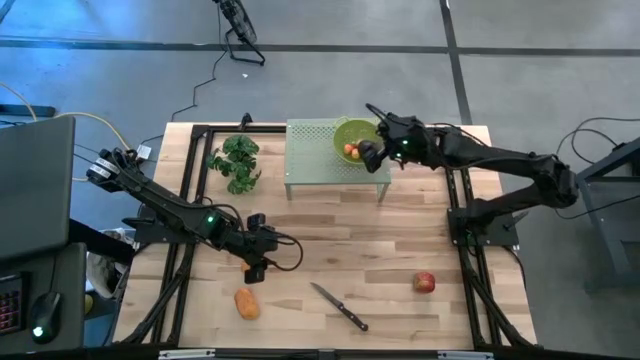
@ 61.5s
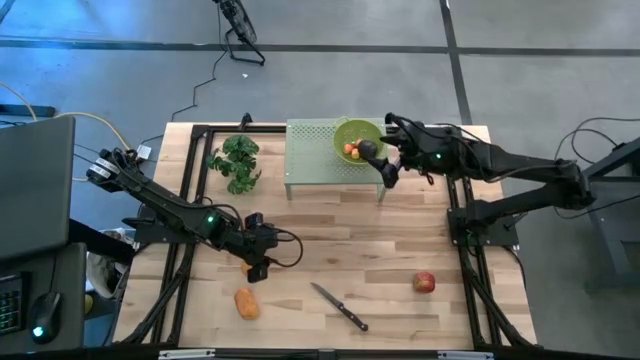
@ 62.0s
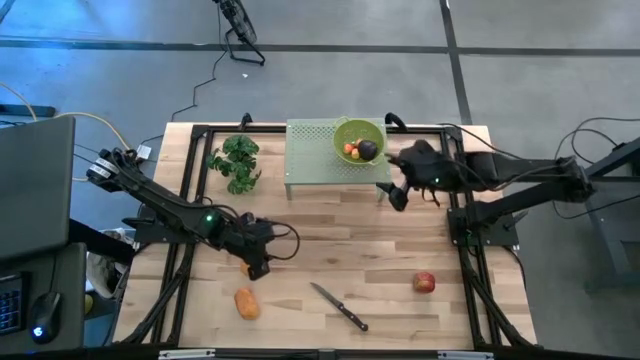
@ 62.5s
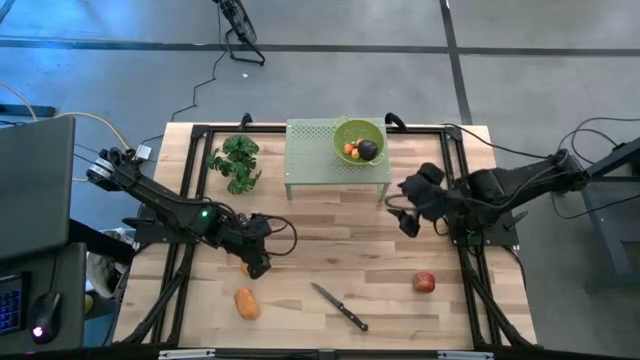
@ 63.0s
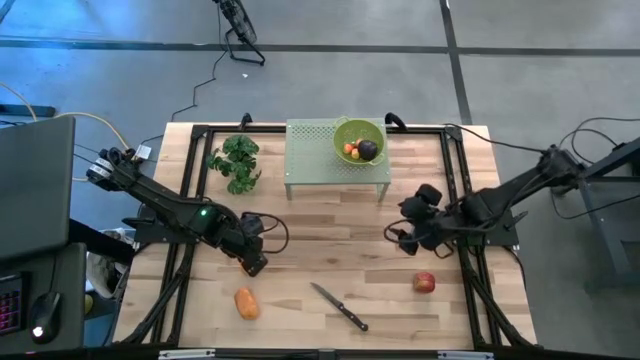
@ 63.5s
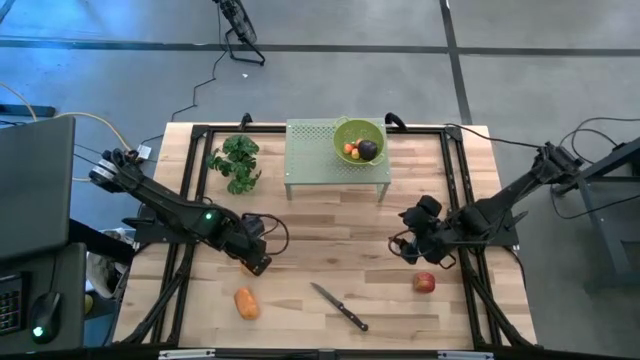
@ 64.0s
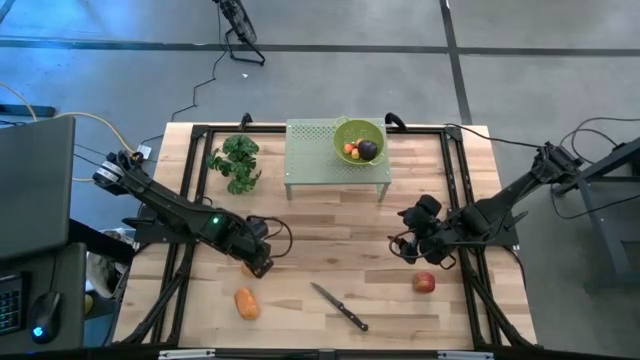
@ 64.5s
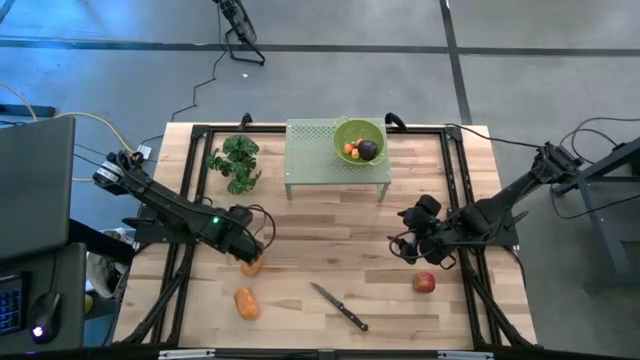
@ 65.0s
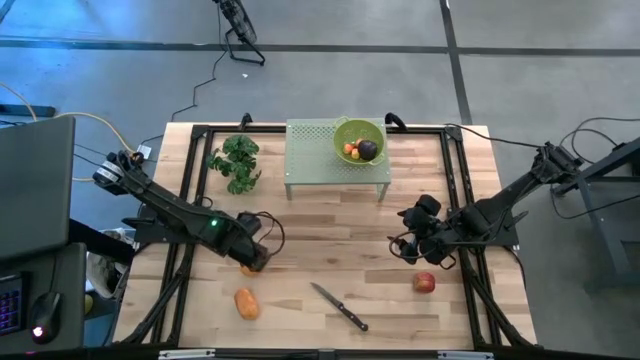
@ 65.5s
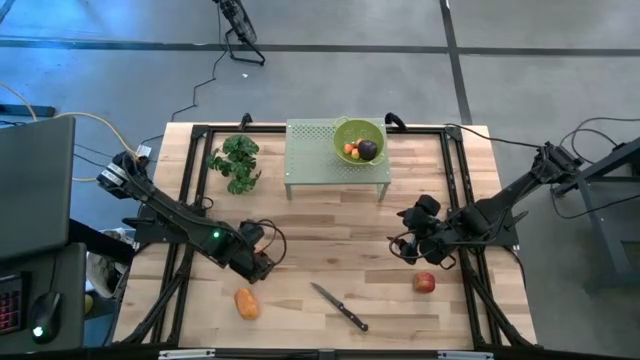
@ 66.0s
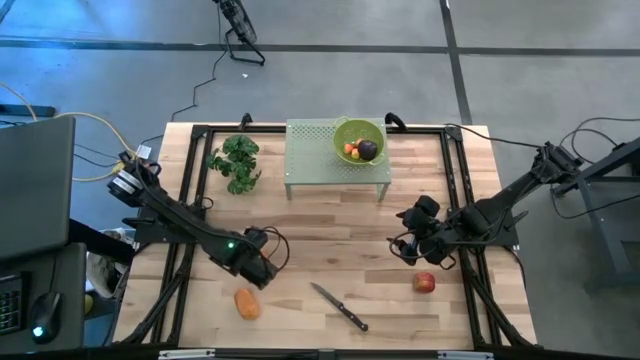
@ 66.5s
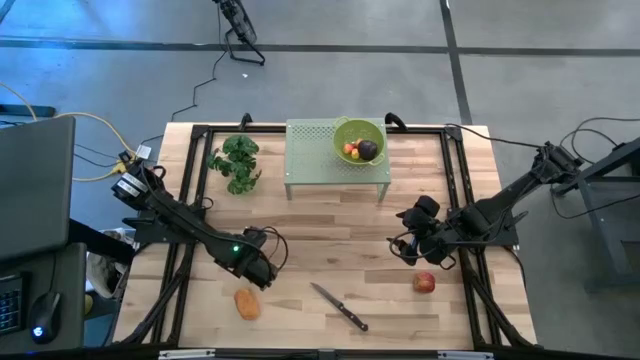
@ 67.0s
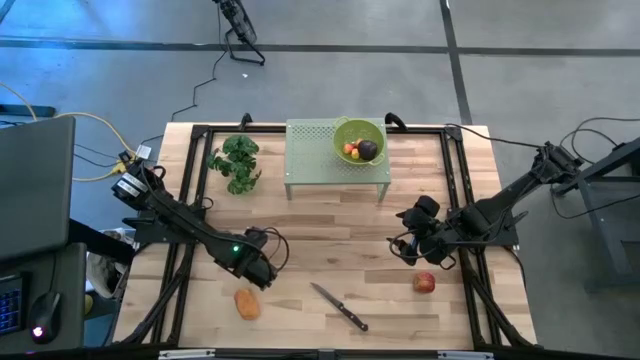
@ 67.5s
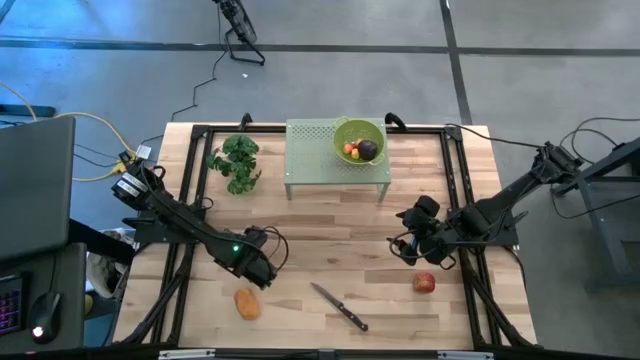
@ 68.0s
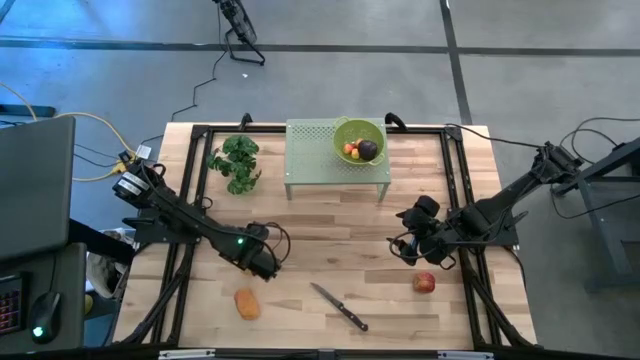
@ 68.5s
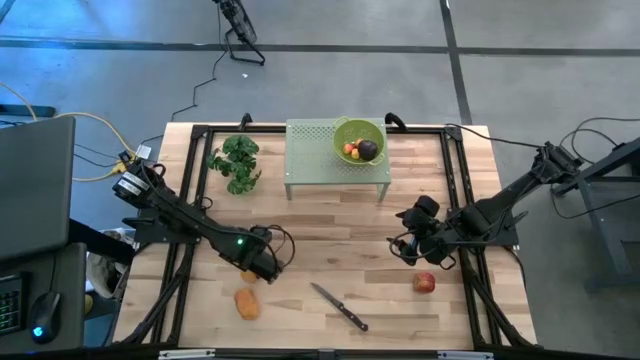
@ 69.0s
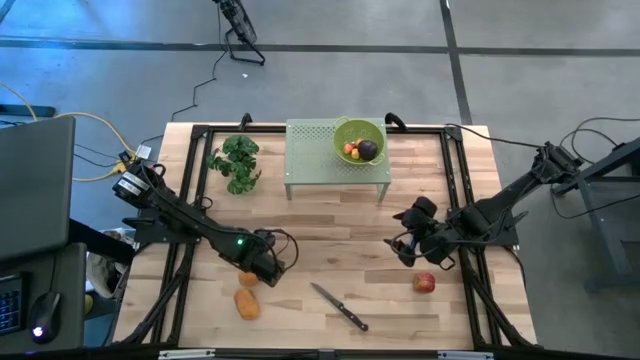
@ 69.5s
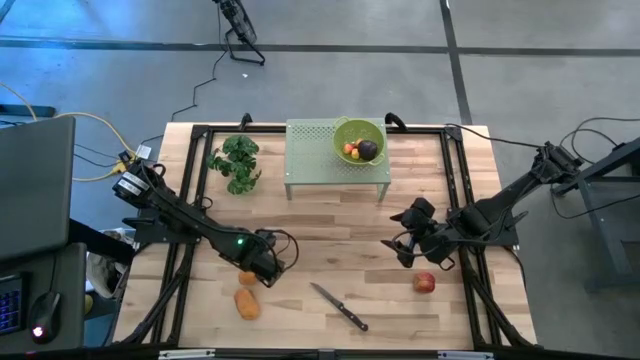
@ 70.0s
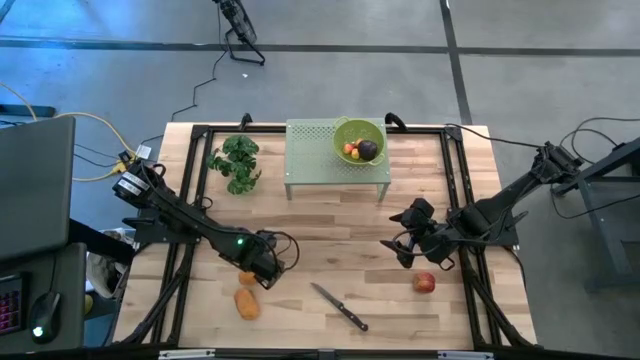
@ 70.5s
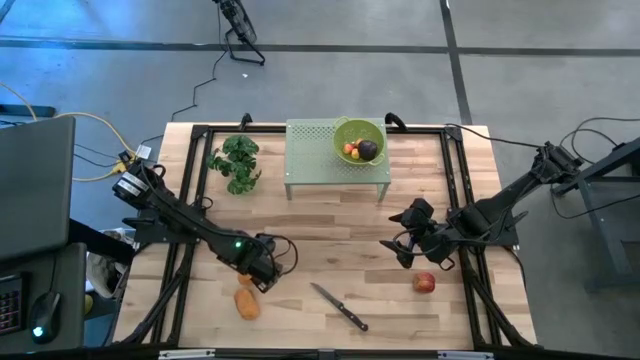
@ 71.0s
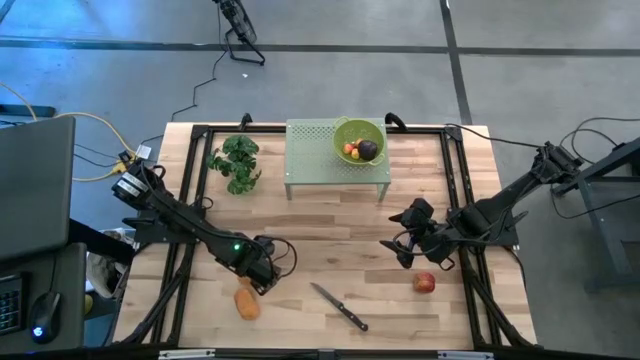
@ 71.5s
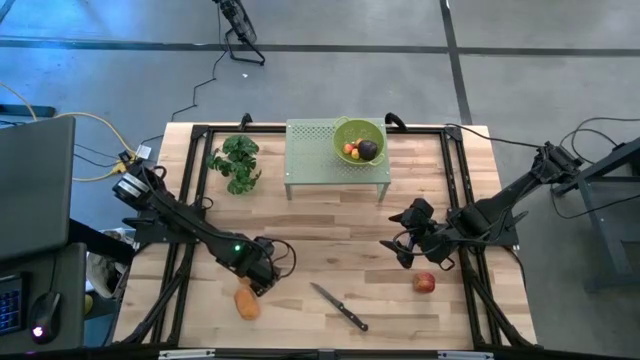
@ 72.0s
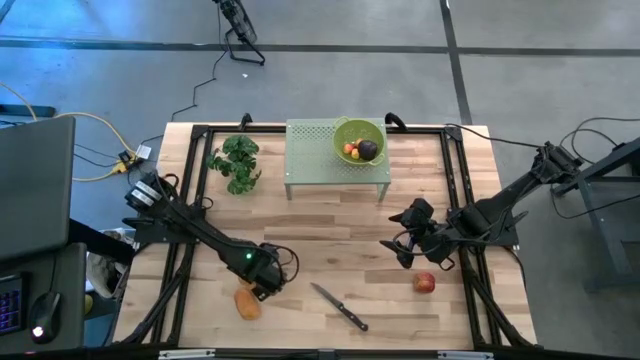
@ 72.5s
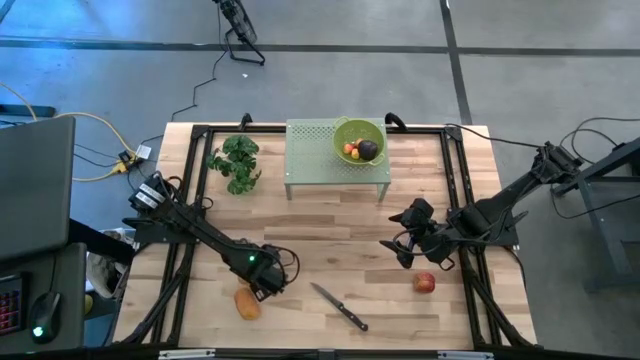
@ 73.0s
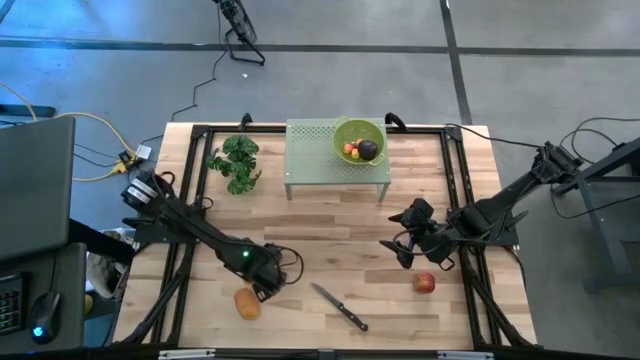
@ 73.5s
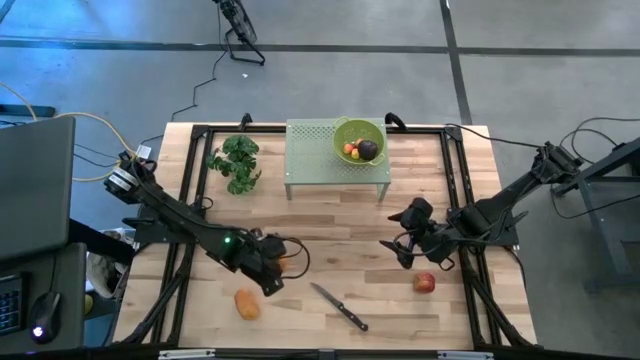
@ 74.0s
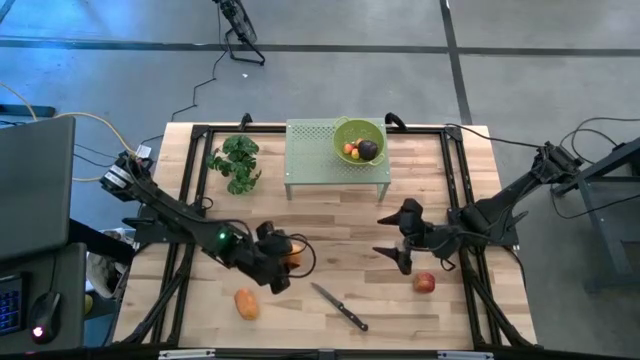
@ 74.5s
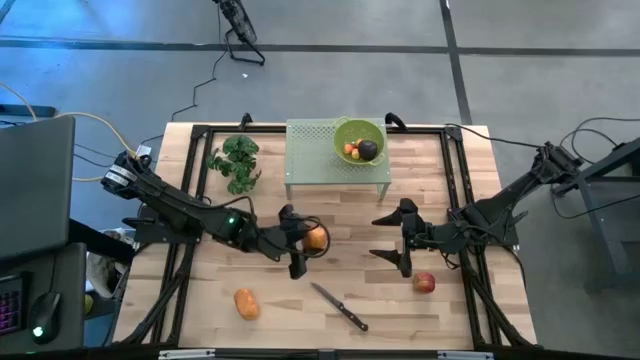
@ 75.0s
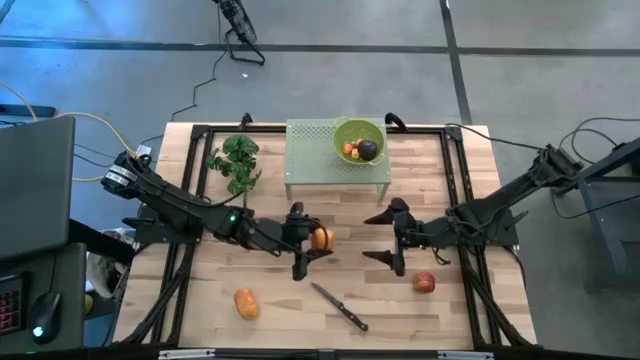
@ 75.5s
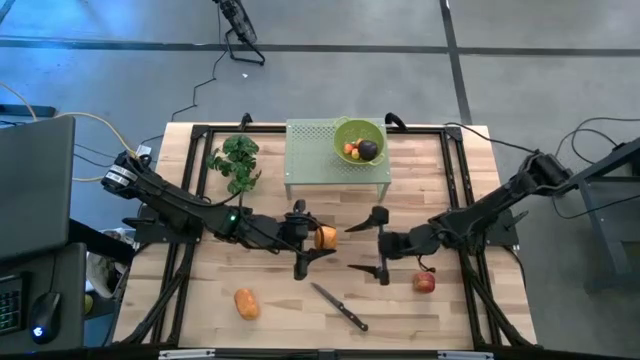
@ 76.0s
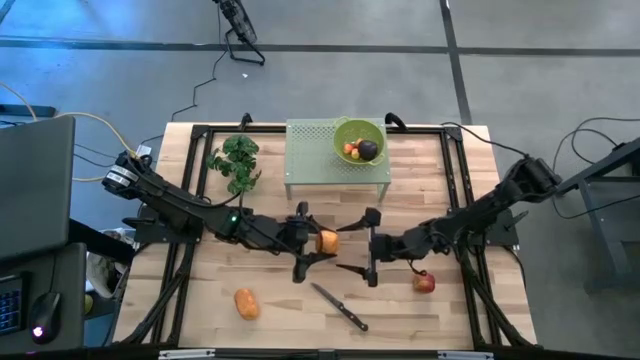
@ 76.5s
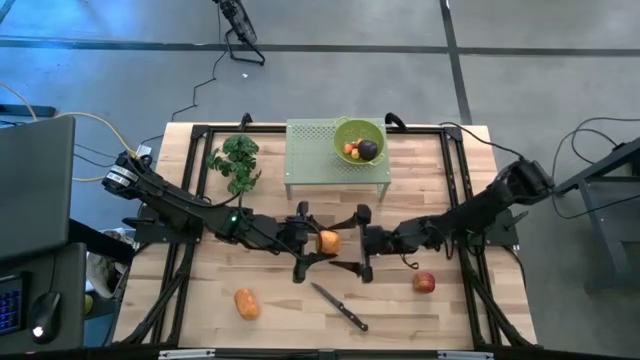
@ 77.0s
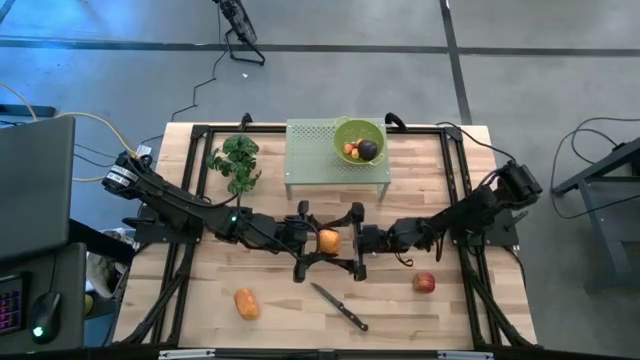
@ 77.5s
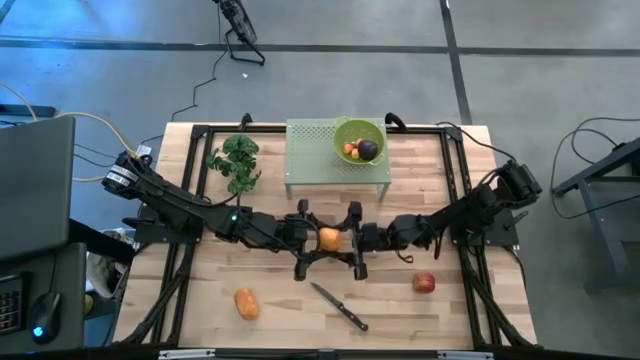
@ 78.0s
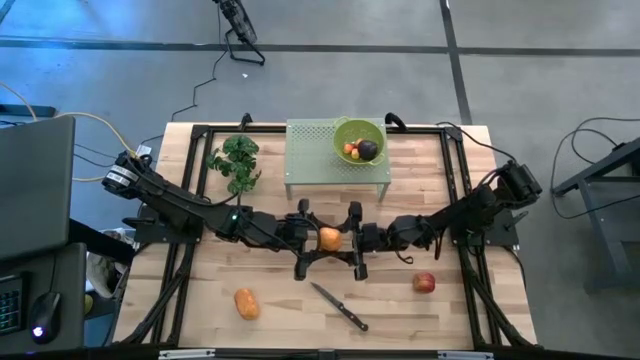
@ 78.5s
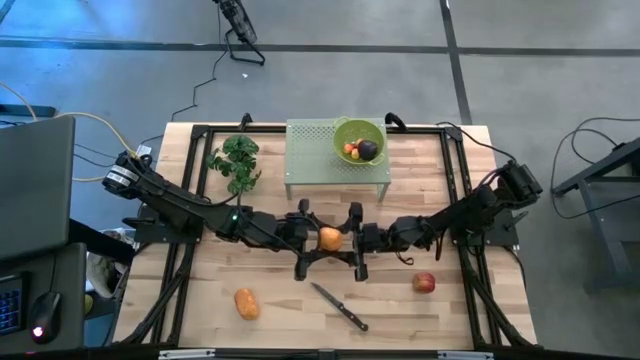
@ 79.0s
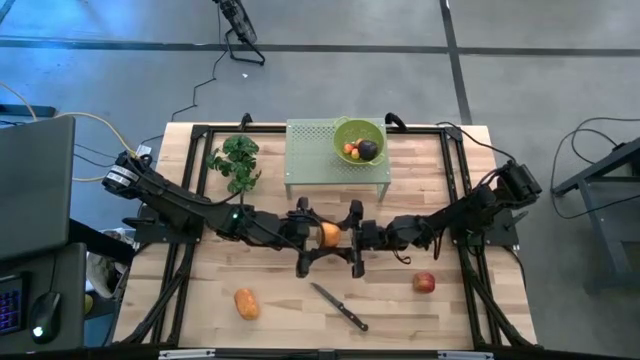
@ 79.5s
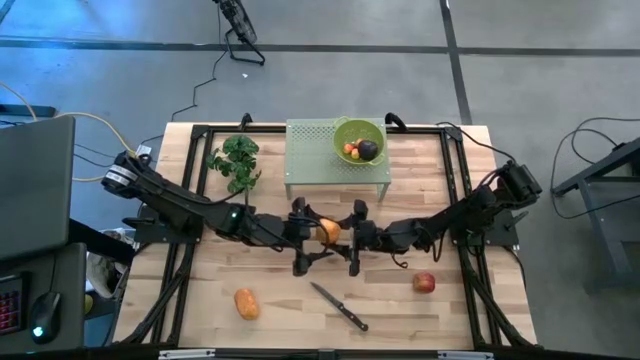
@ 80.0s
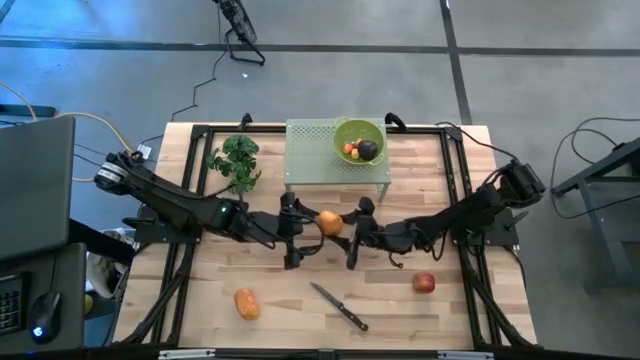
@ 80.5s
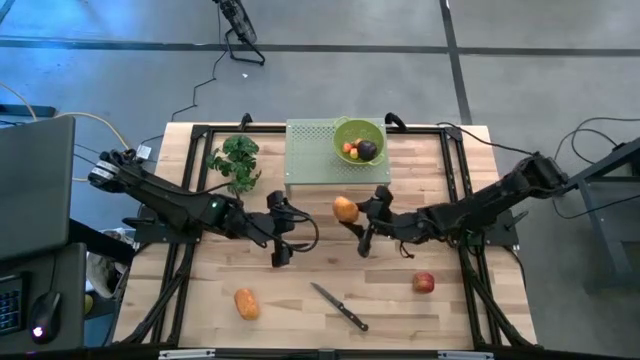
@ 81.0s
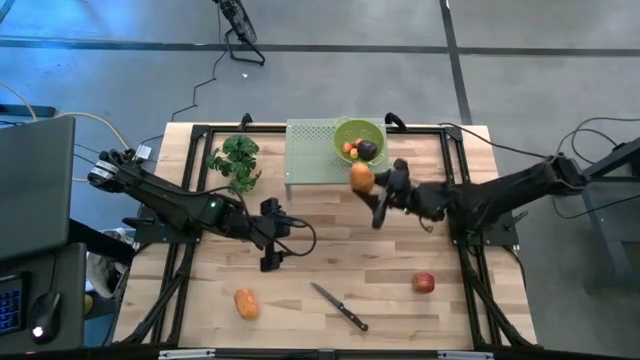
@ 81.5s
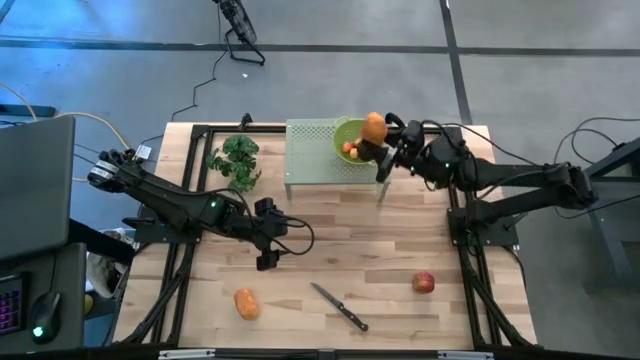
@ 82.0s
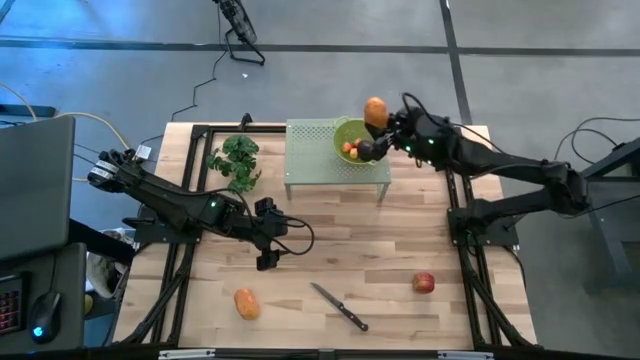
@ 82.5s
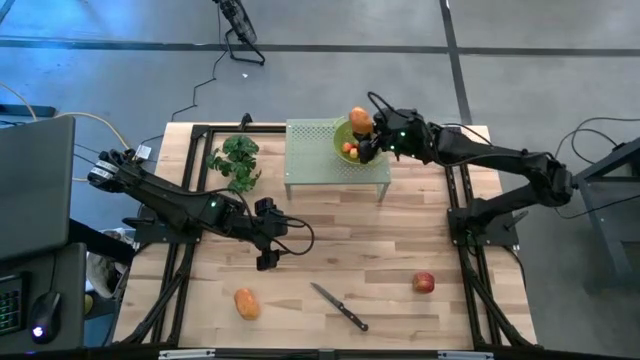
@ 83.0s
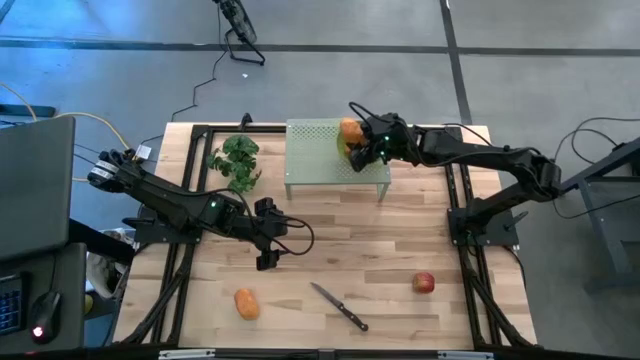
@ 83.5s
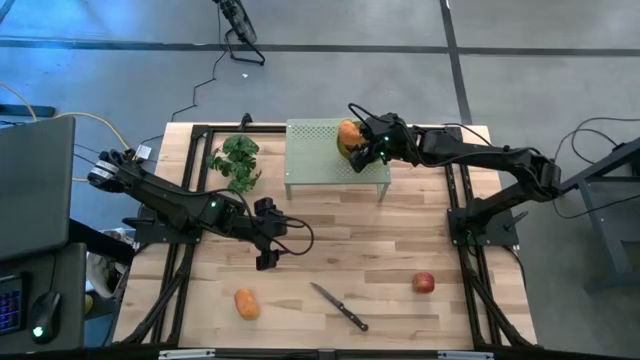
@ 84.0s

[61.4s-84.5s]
Task: Pick & Place Fruit
Put the top potato into the green strainer bowl on the top shelf
